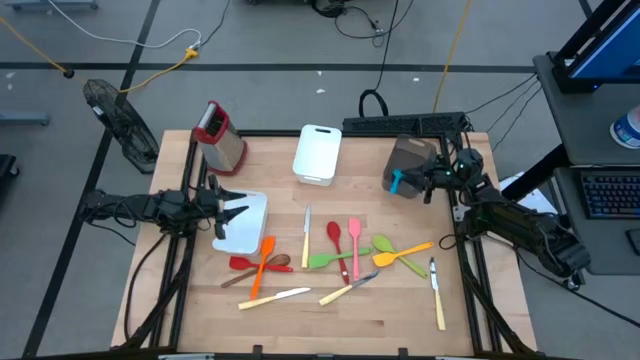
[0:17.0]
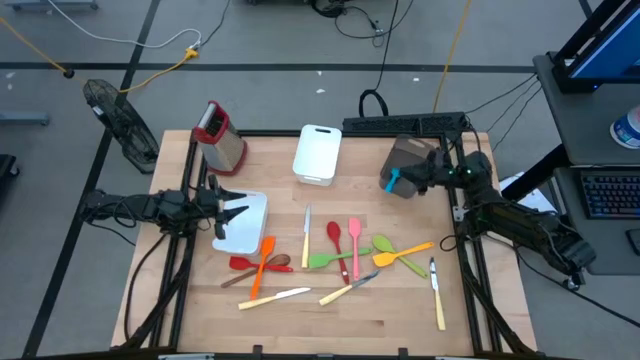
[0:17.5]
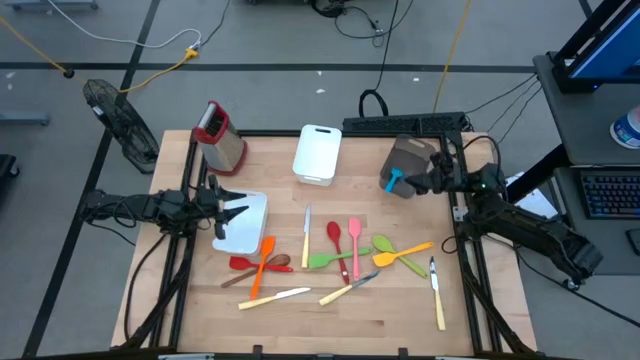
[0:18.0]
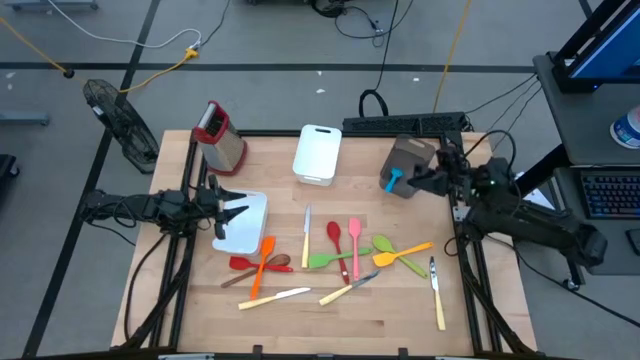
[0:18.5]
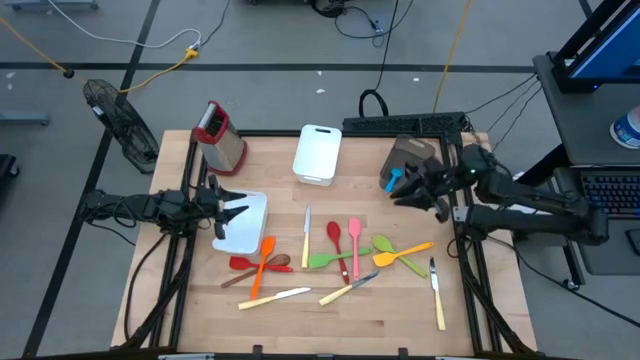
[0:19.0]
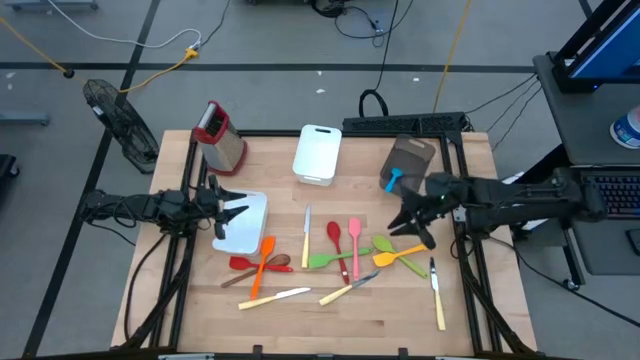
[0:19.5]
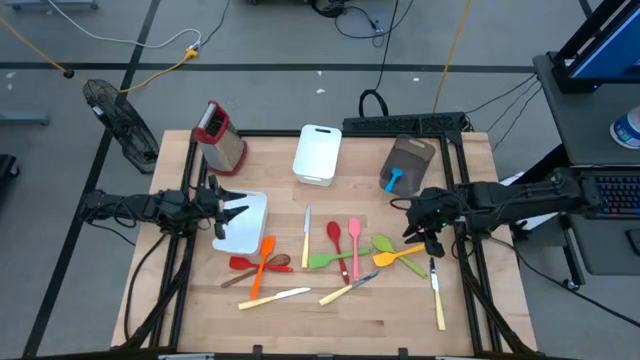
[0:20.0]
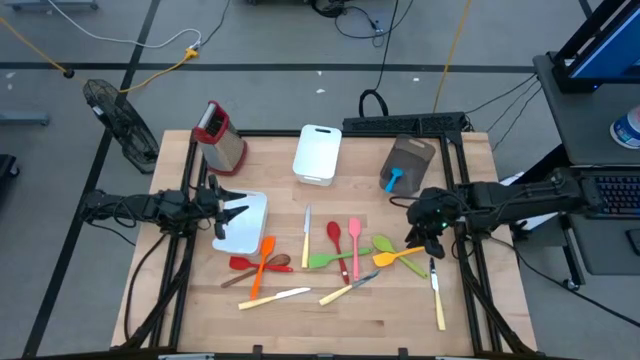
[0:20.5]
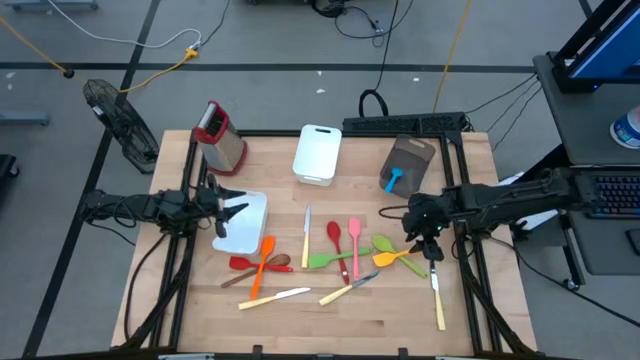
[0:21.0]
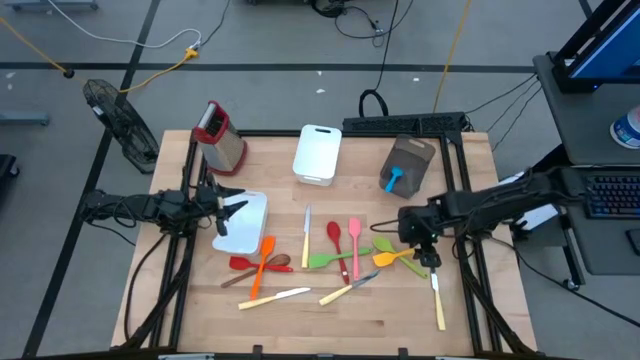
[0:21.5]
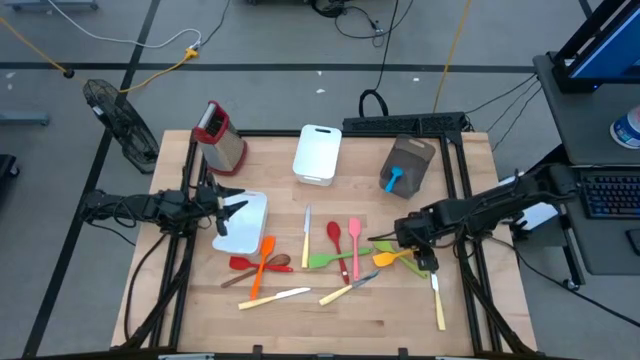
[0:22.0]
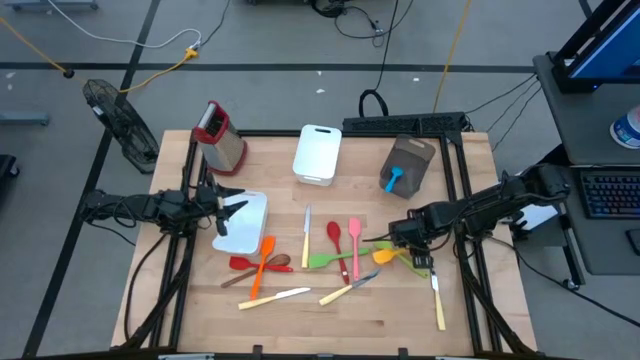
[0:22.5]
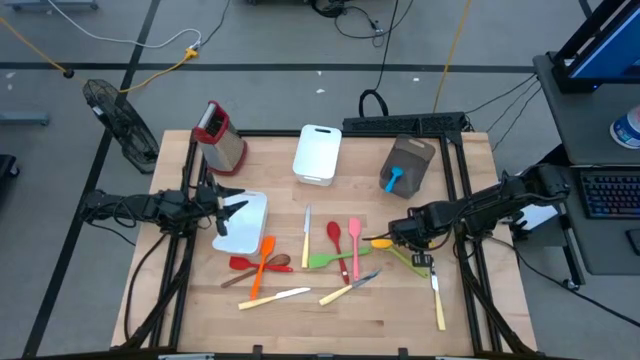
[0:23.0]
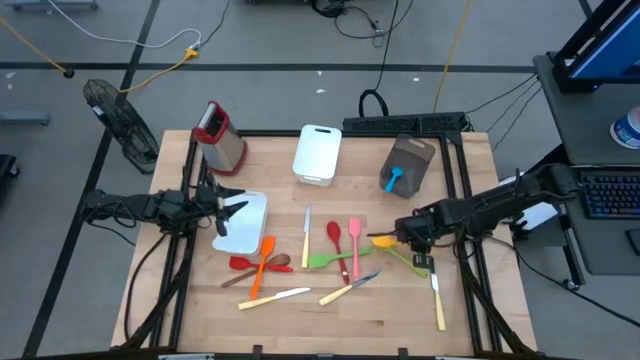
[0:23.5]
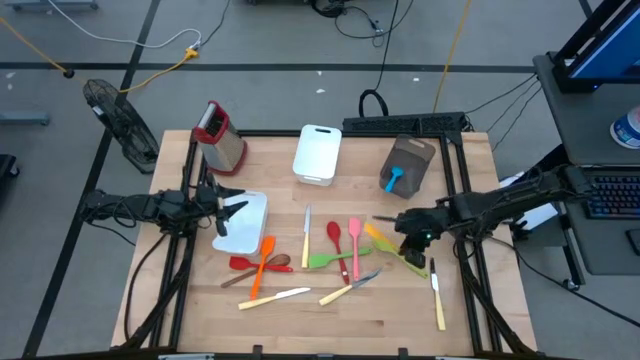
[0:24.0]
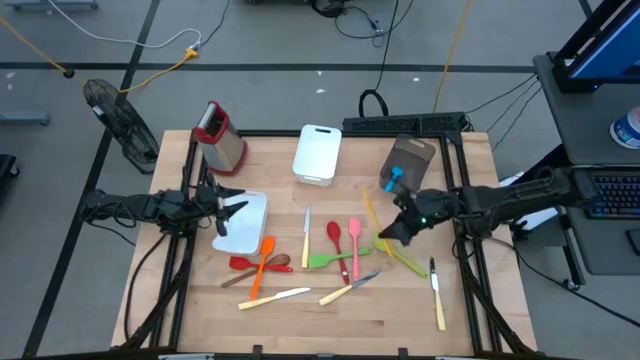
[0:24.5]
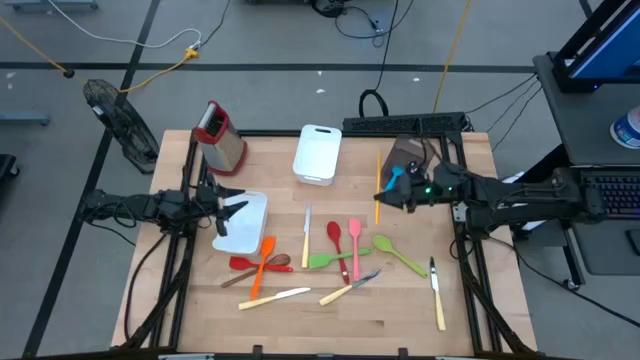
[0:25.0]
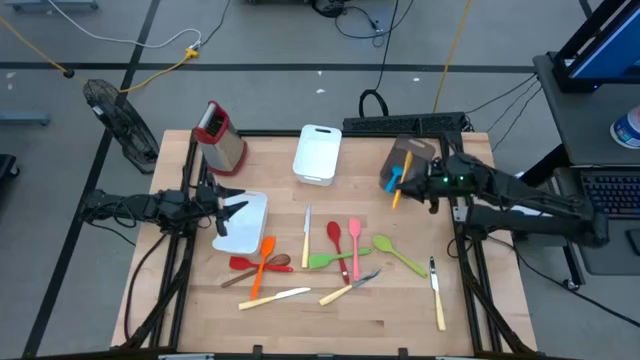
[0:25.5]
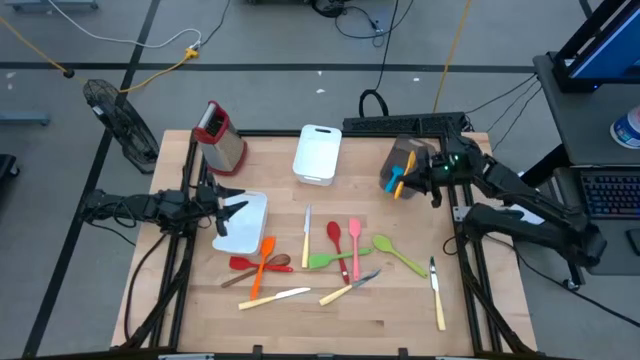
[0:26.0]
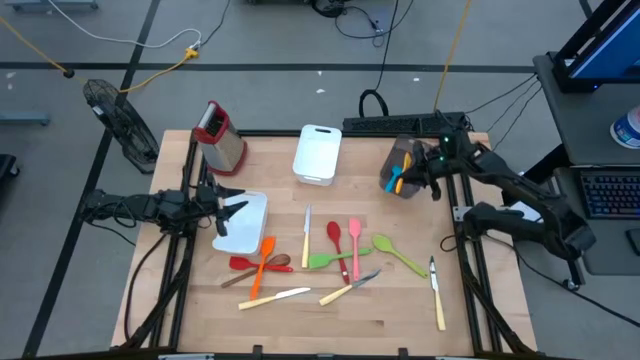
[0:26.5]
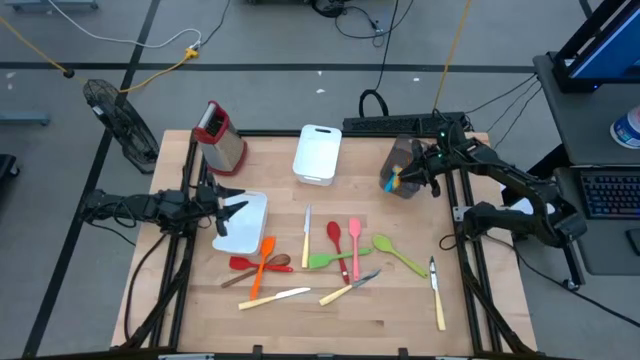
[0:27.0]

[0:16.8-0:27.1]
Task: Pick & Place Kitchen Items
Put the yellow spatula into the black bin

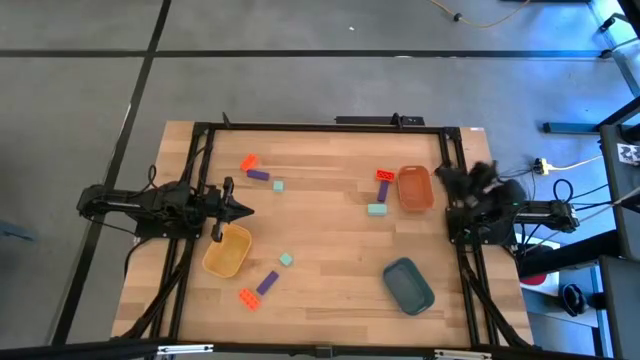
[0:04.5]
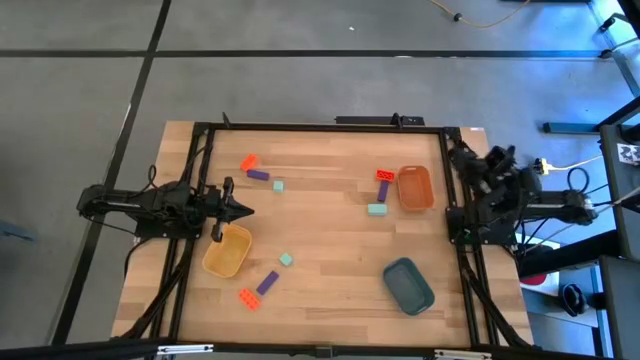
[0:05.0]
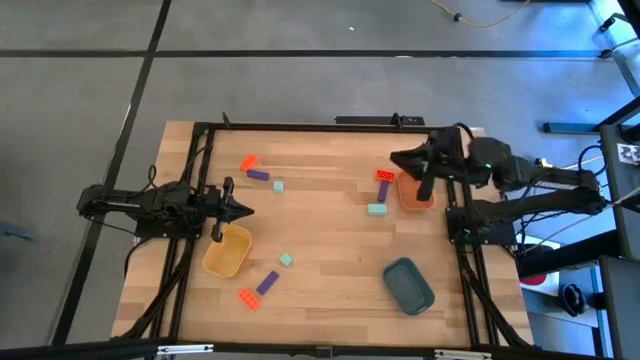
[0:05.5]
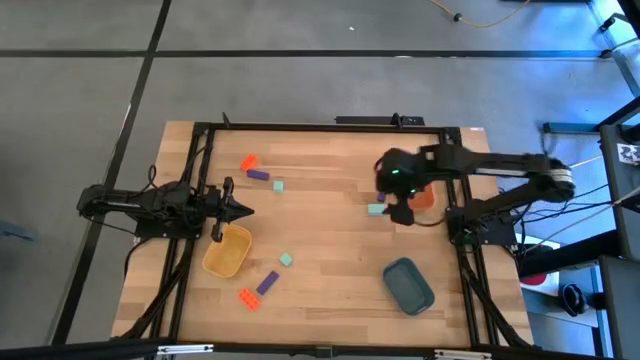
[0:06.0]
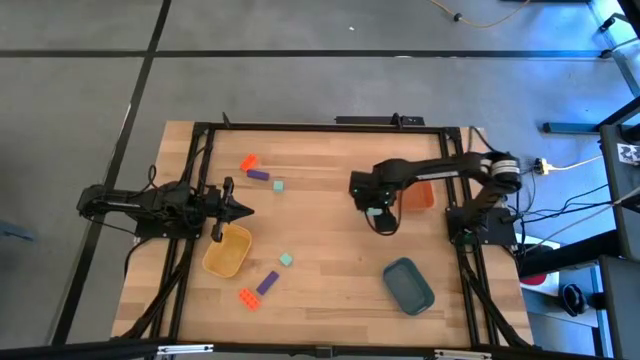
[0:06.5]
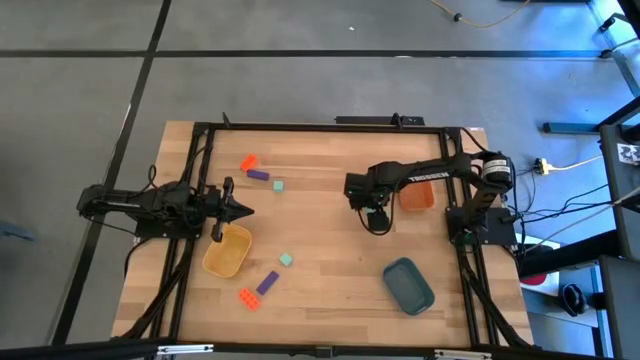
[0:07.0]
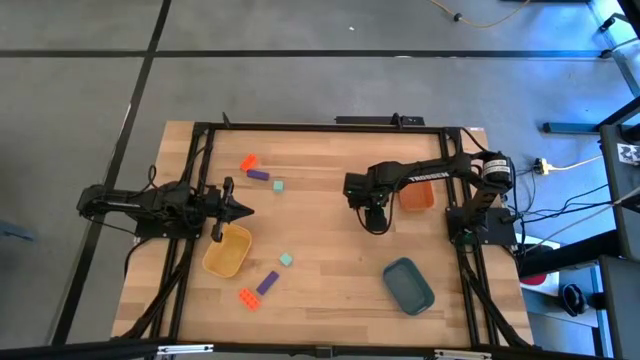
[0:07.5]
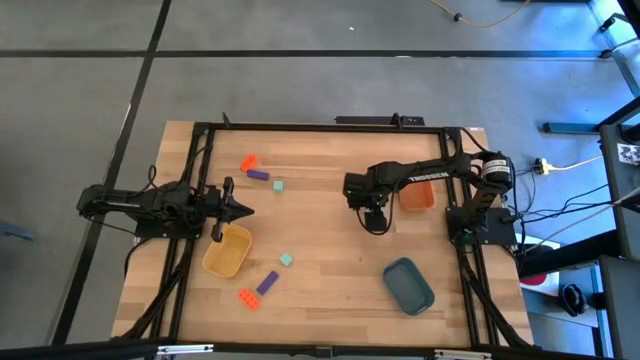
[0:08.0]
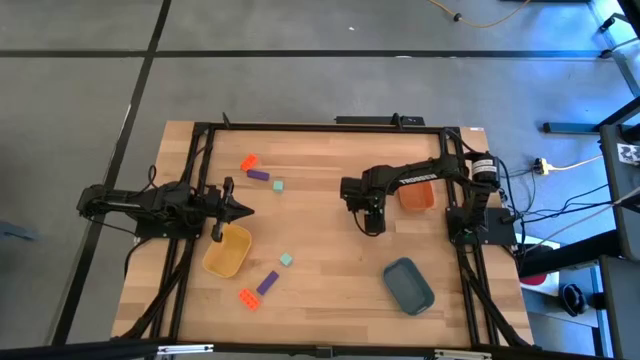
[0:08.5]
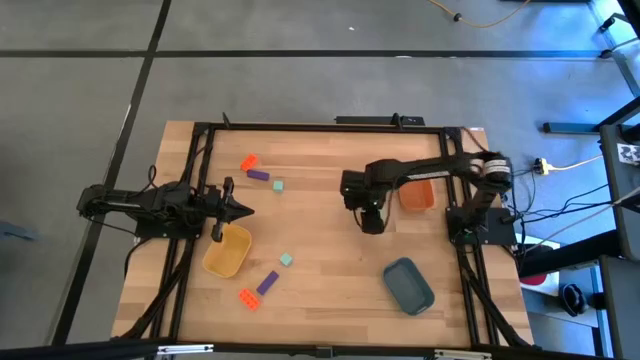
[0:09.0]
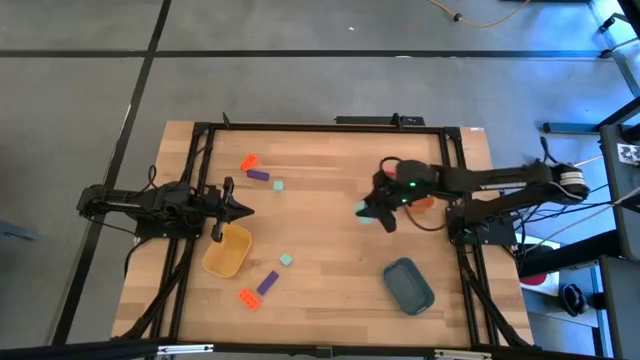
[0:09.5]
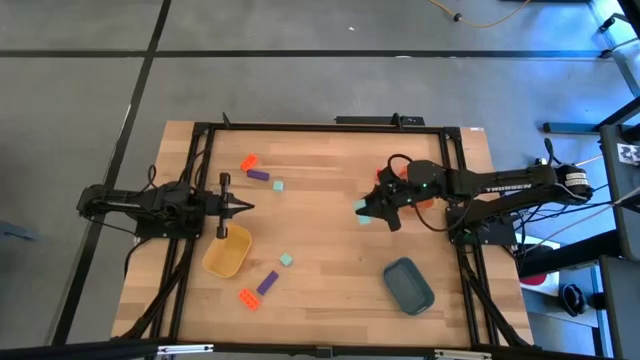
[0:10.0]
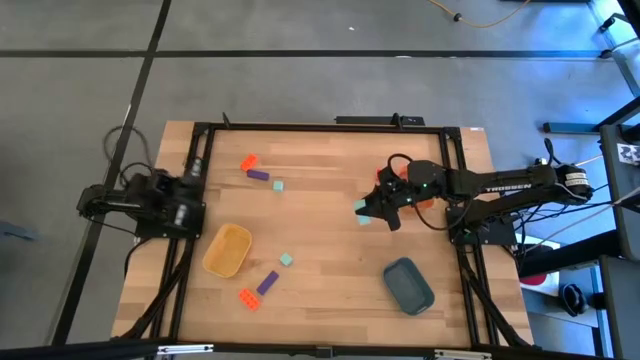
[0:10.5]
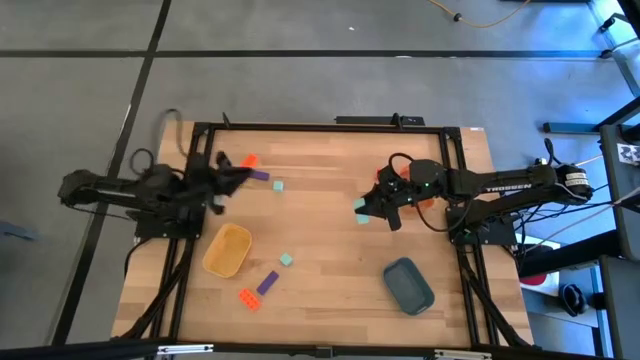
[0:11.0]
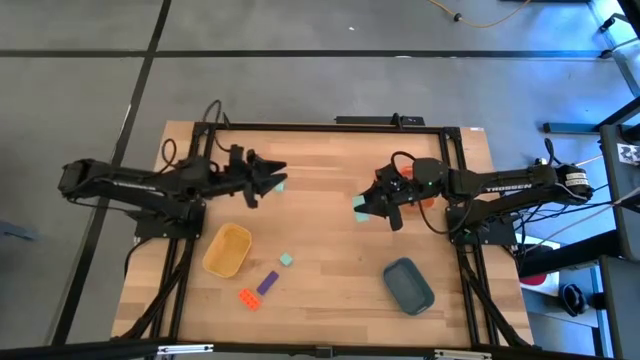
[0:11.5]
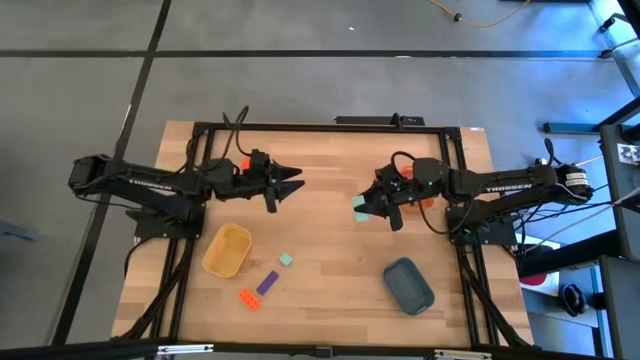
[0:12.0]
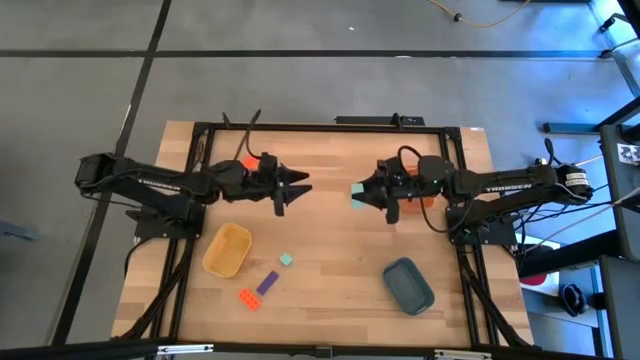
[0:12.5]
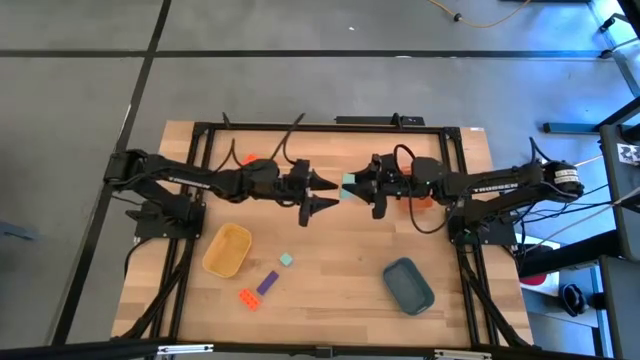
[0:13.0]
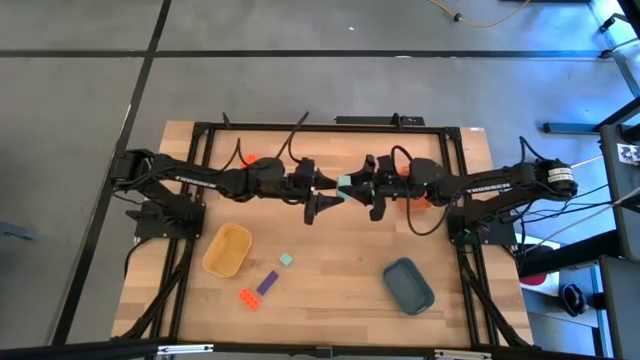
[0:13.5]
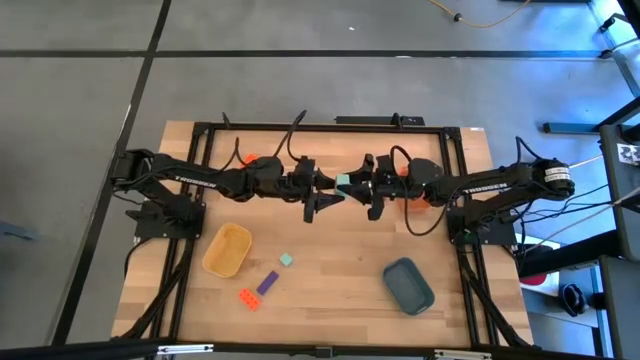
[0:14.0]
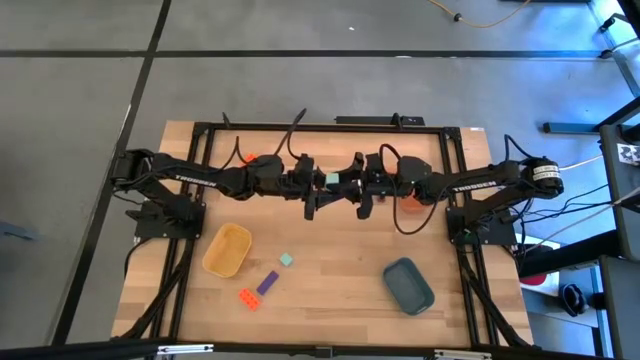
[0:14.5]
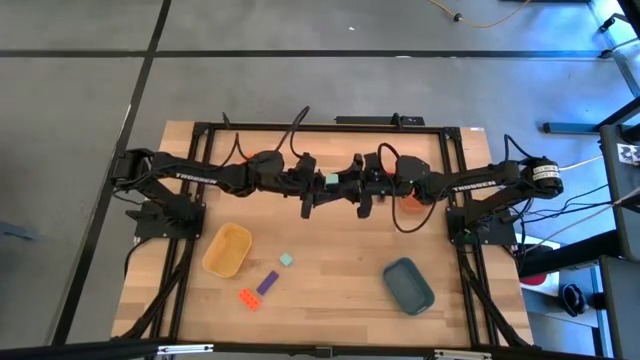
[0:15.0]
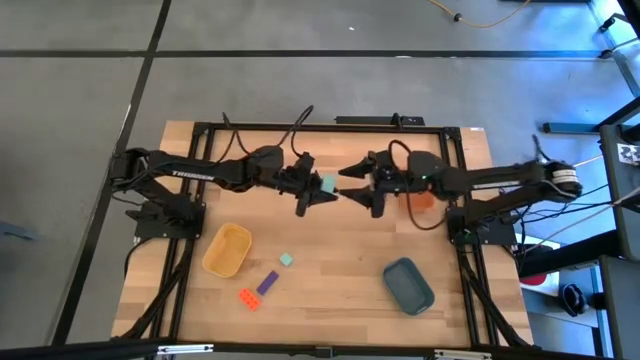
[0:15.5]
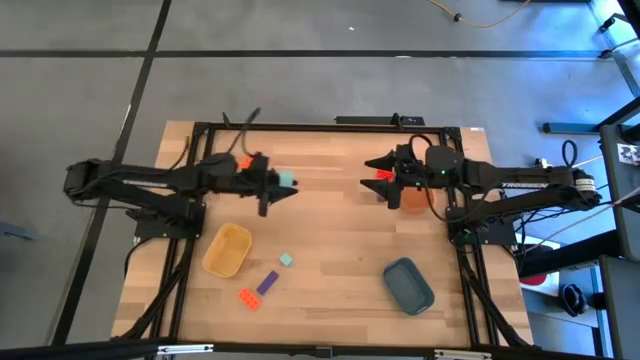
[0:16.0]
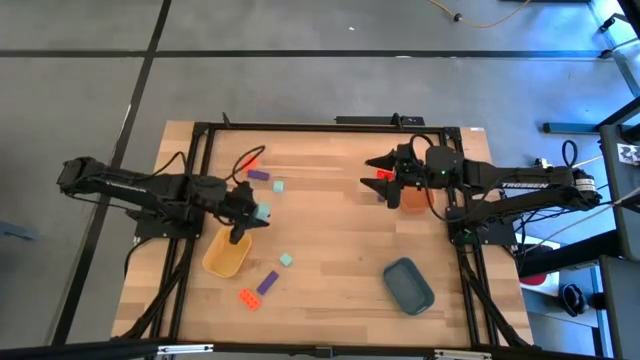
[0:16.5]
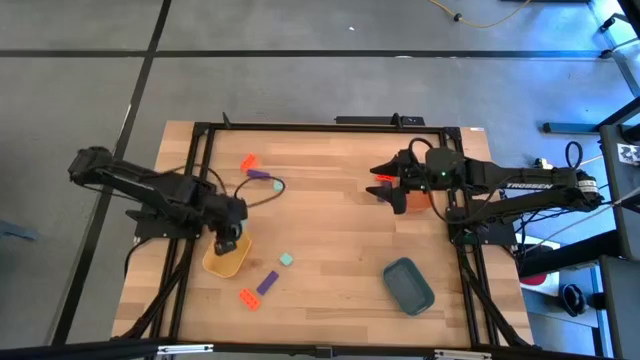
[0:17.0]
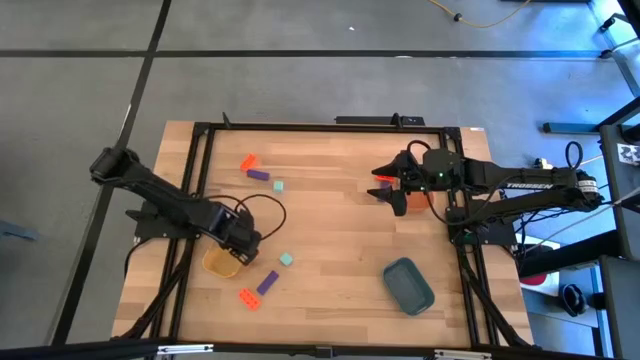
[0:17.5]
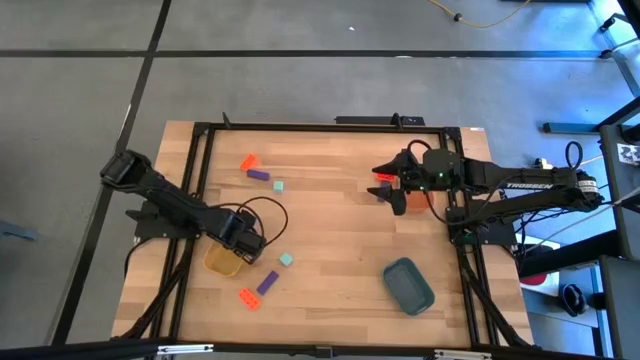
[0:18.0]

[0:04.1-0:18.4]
Task: Sort & place blocks by color
Put the right blue block into the yellow bin
